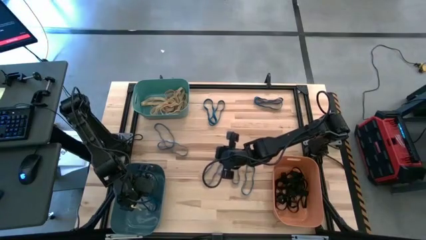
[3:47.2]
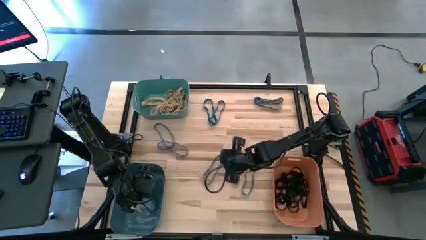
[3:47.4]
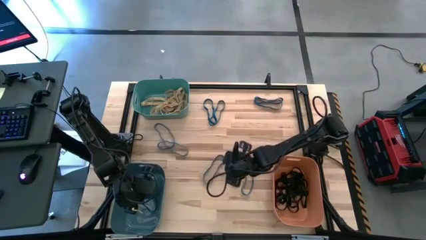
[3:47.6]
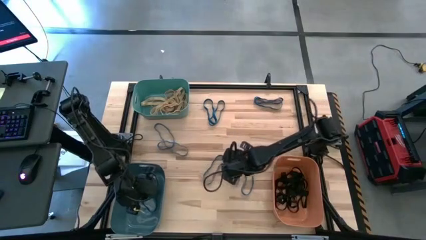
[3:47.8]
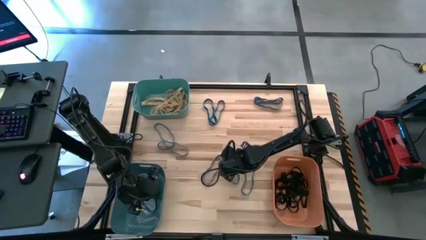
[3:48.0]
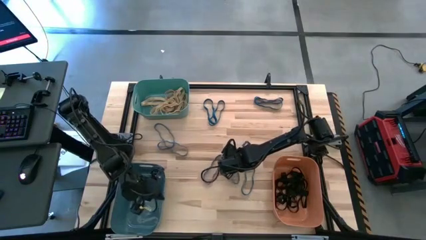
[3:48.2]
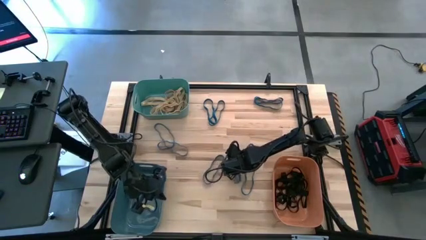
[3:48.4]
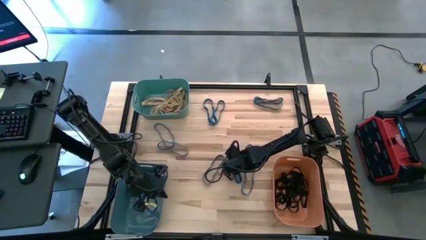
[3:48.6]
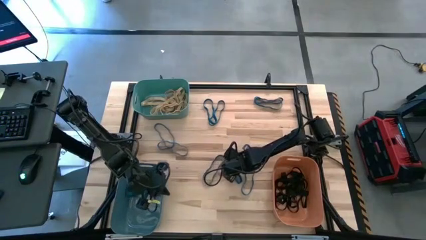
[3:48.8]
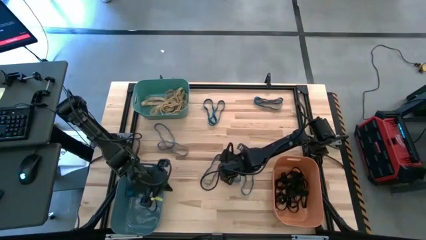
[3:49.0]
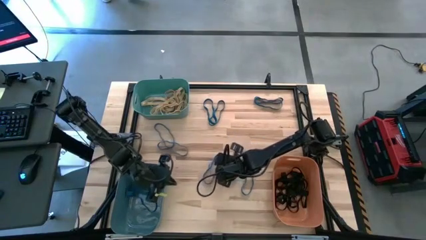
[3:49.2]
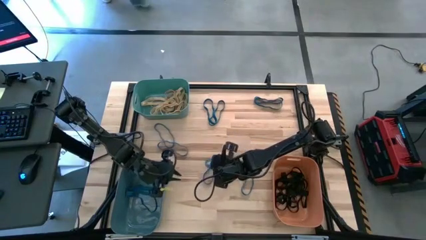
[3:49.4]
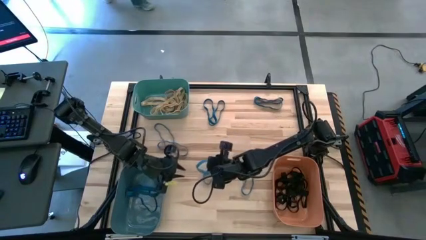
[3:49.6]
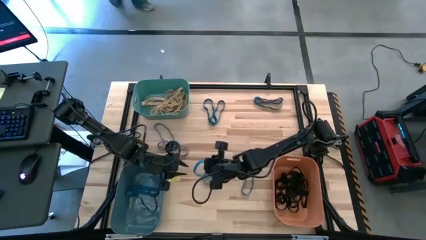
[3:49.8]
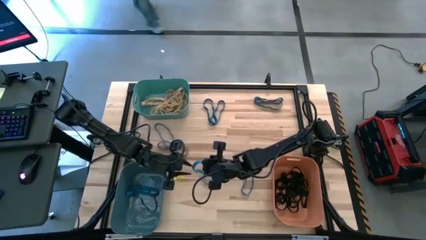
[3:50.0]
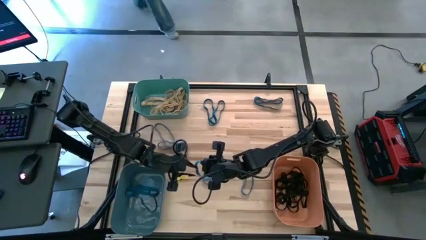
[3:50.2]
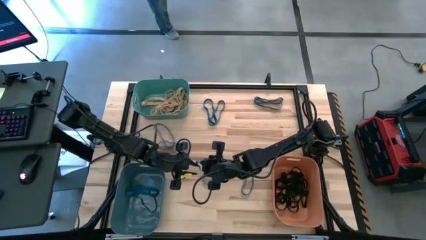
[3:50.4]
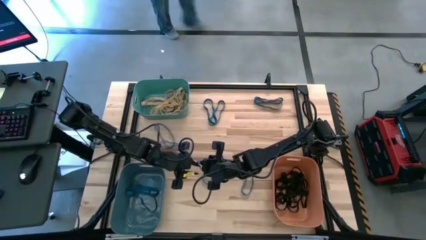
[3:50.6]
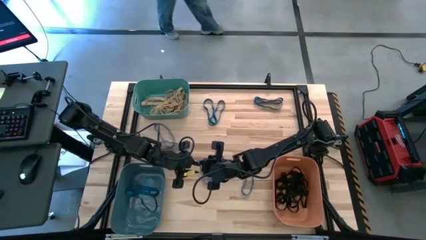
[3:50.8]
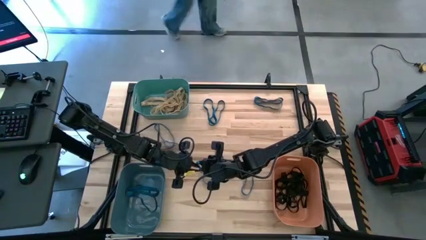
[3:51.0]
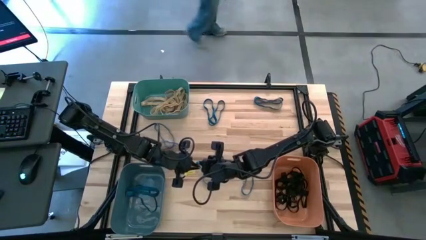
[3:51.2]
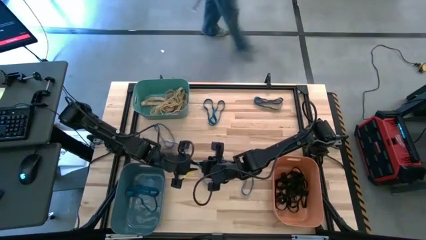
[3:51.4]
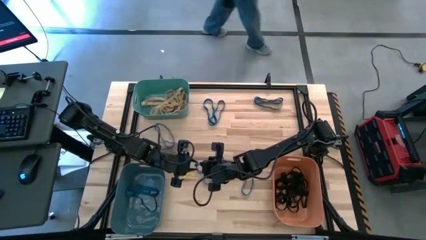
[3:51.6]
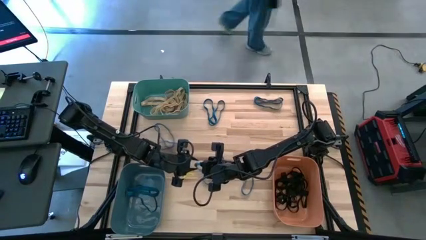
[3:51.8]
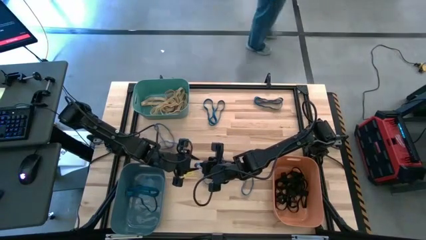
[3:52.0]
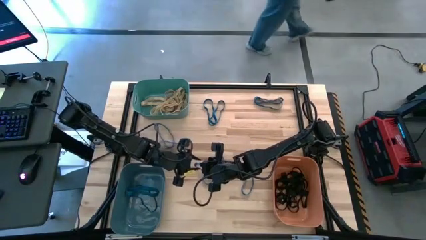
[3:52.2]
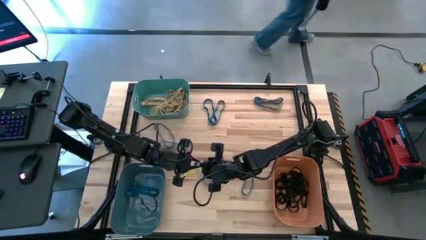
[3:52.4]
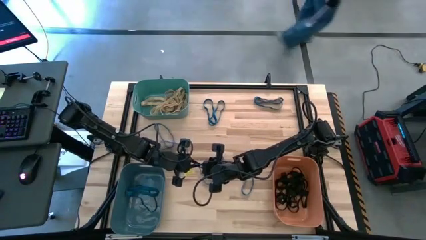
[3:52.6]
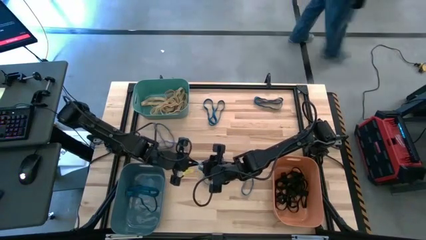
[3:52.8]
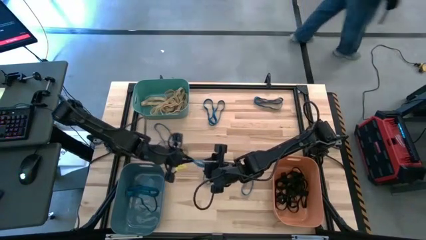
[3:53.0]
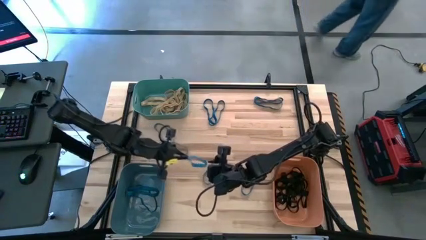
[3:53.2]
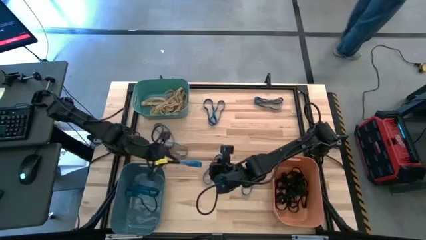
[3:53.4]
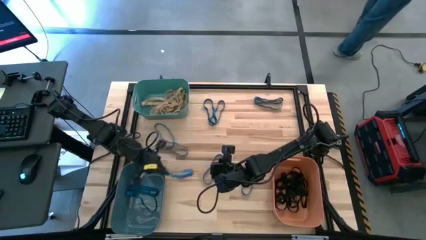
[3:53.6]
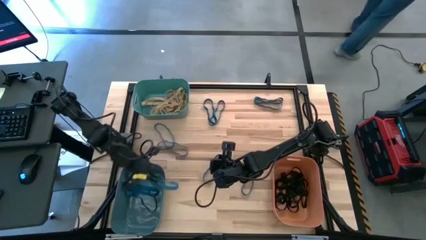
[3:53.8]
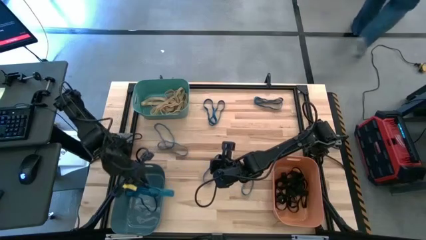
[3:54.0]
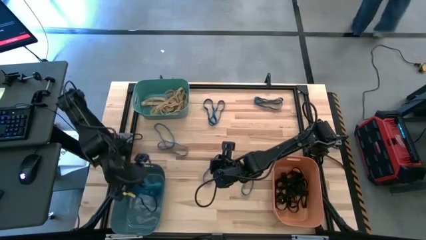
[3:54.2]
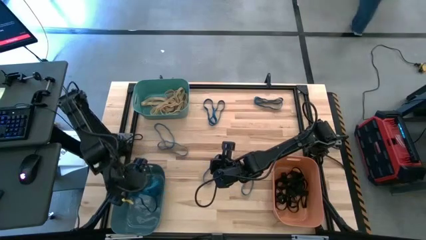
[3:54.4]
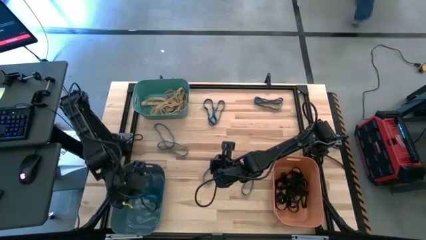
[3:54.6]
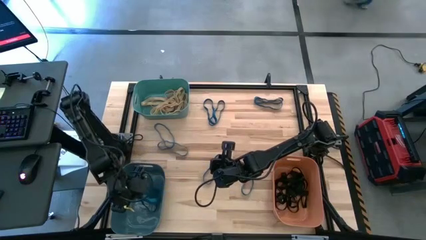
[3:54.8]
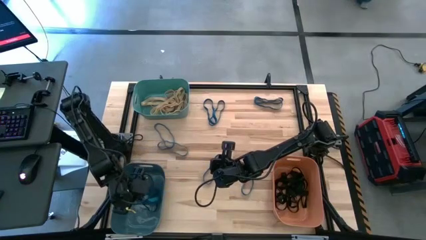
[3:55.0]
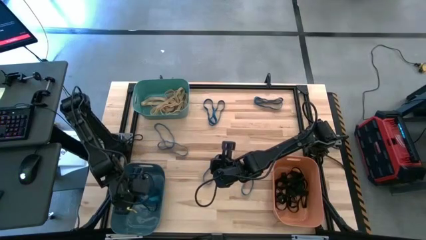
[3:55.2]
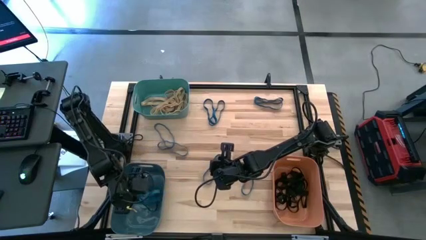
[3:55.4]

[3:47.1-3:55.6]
Task: Sort rubber bands into baskets
Put the blue rubber band into the blue bin

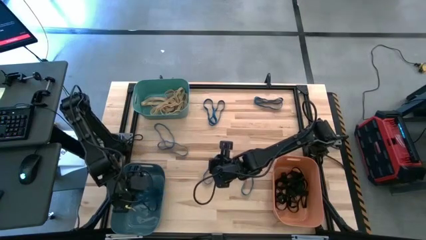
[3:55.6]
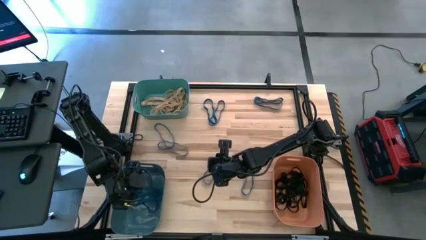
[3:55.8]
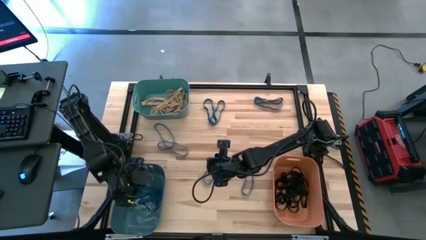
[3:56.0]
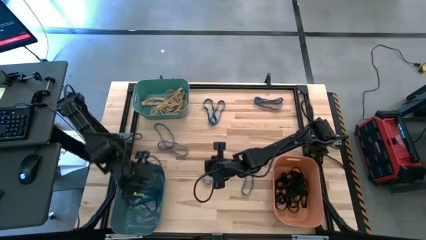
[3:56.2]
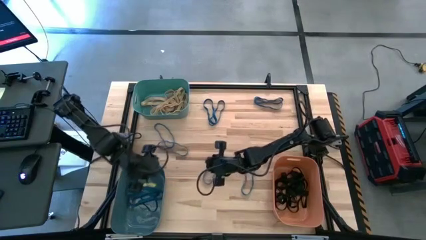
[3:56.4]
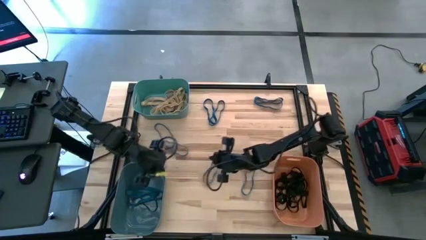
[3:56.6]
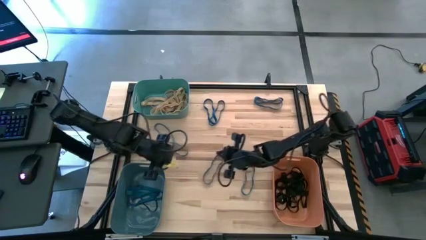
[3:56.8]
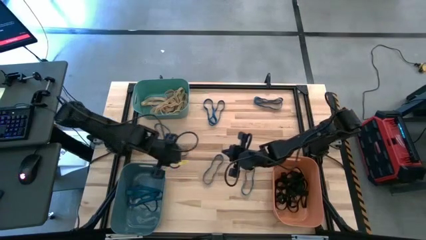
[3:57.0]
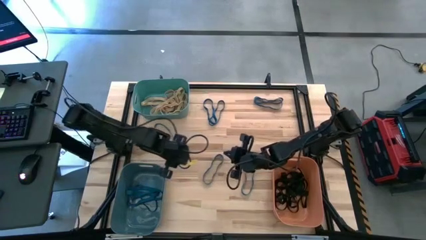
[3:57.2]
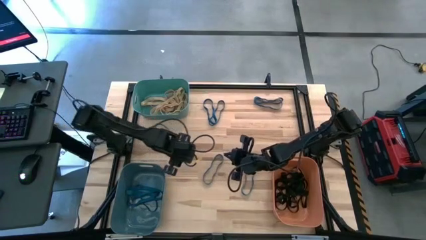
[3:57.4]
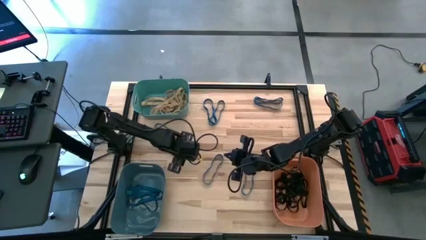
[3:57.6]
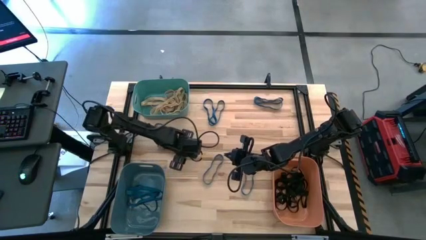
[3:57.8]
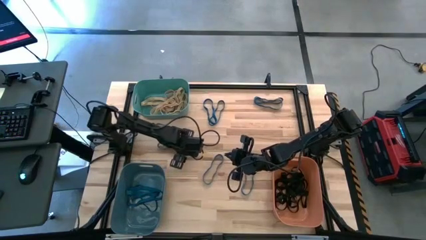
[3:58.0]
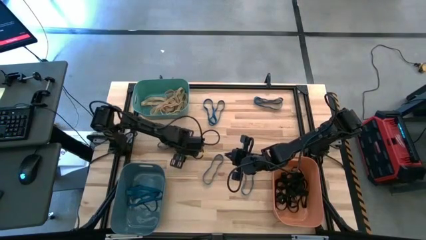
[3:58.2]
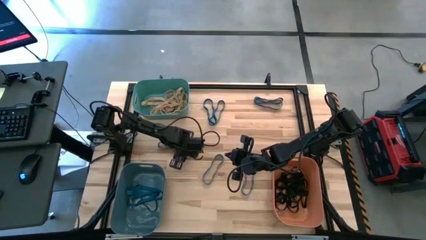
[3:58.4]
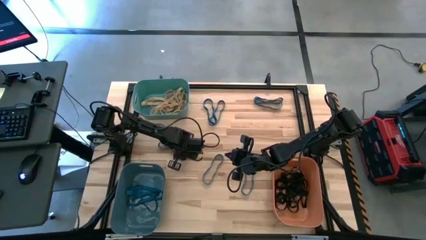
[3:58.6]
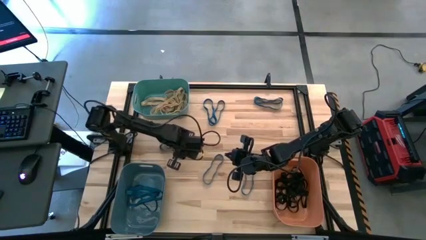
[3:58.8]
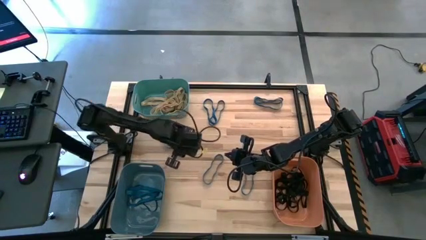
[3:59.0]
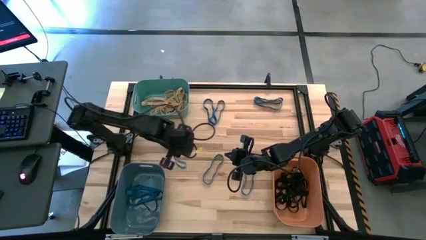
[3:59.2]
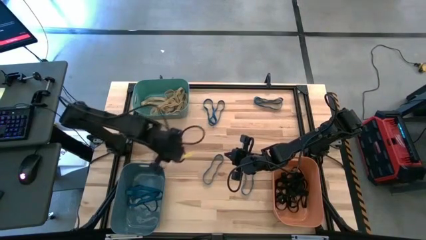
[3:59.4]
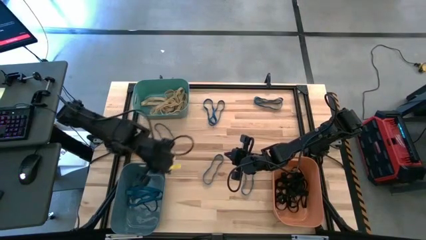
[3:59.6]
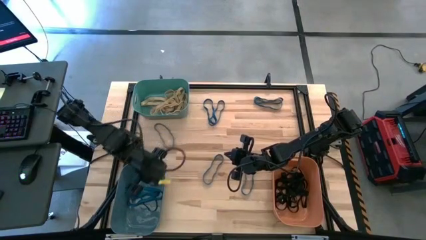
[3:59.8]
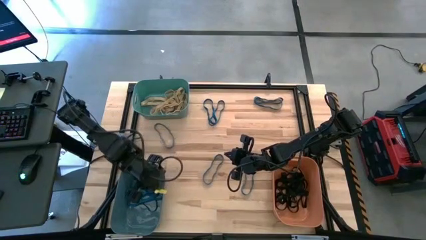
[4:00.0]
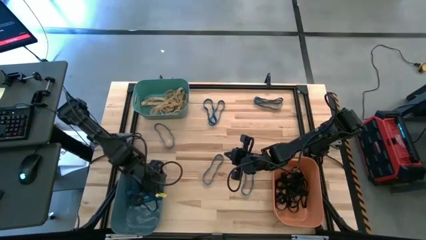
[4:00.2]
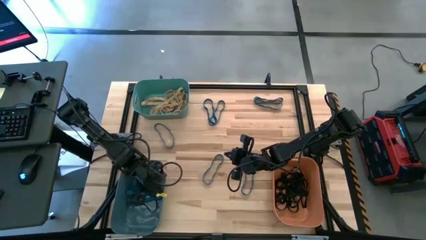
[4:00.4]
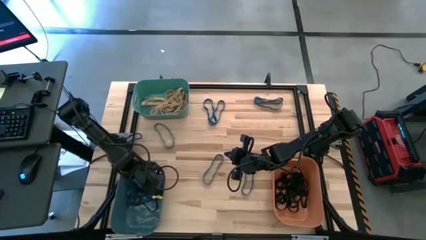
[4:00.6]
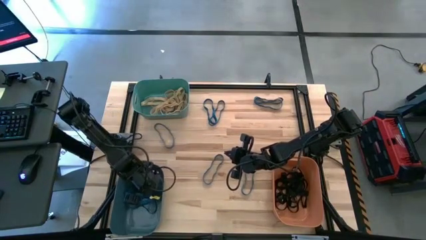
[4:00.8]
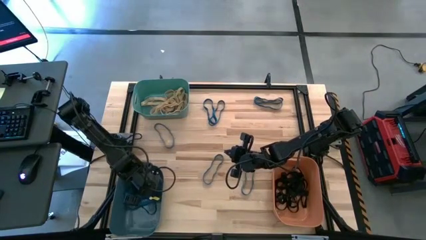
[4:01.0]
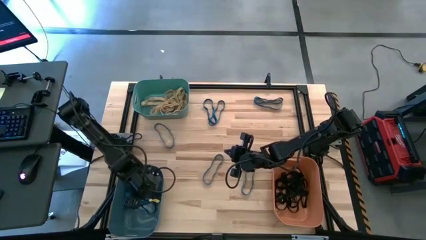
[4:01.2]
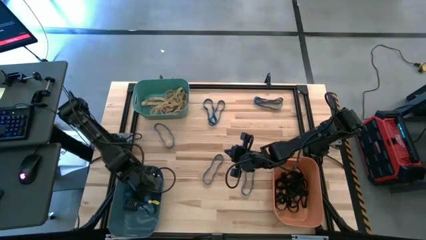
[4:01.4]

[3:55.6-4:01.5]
Put the blue rubber band into the blue bin
